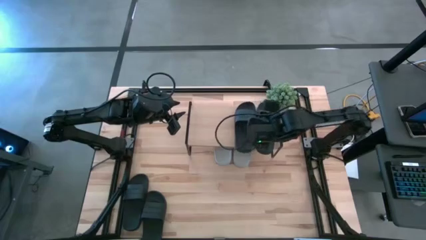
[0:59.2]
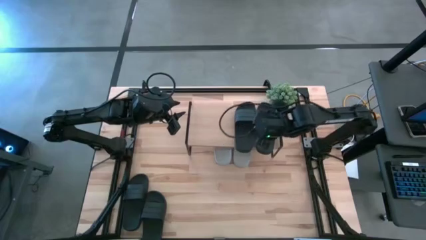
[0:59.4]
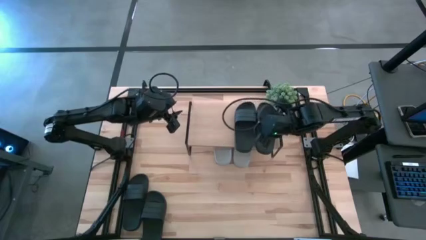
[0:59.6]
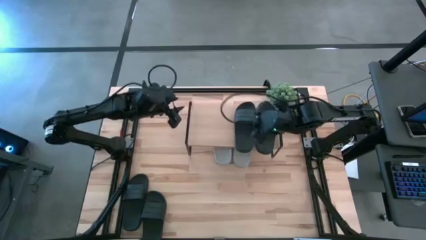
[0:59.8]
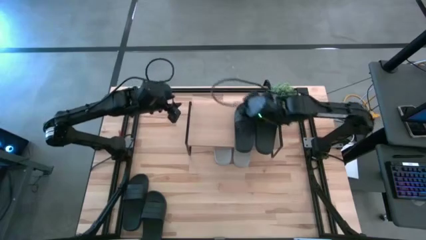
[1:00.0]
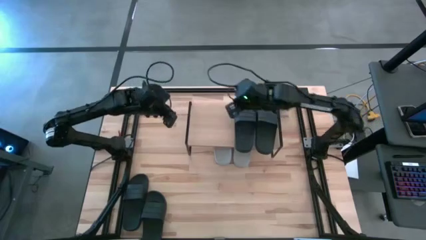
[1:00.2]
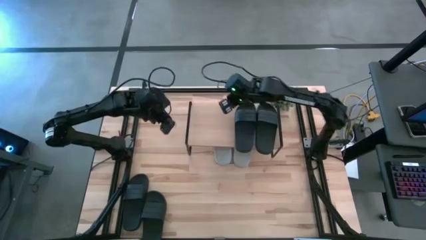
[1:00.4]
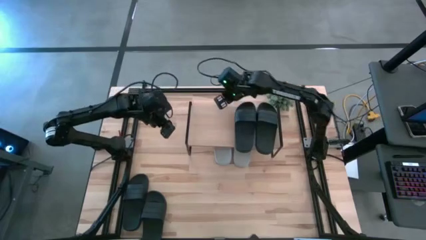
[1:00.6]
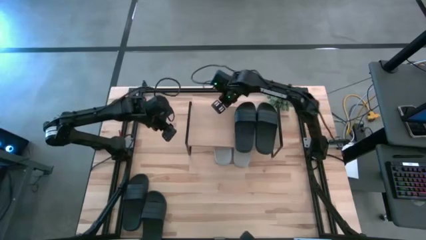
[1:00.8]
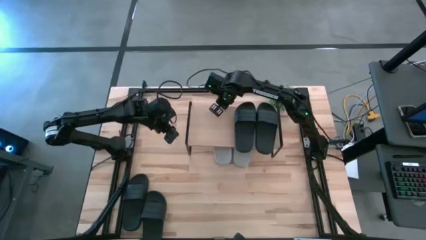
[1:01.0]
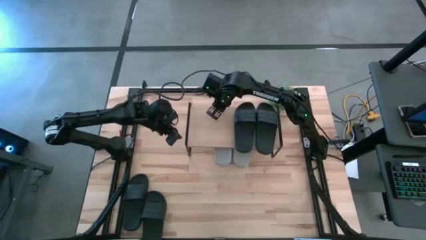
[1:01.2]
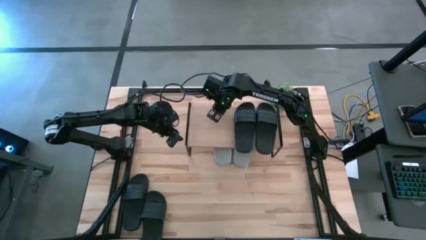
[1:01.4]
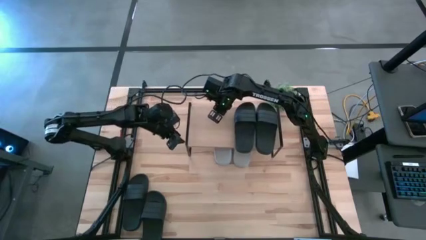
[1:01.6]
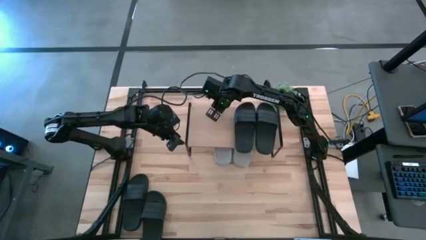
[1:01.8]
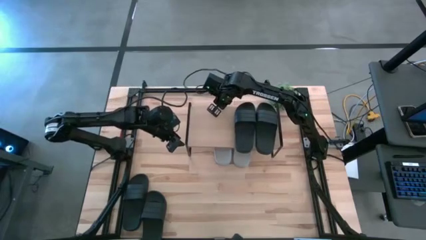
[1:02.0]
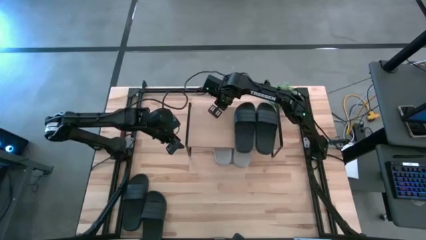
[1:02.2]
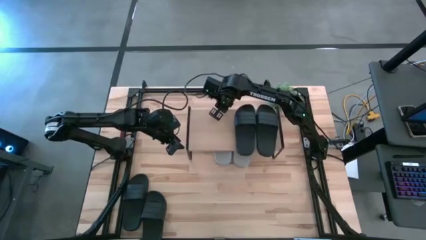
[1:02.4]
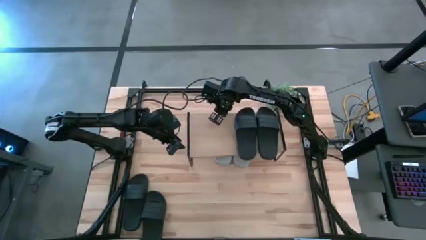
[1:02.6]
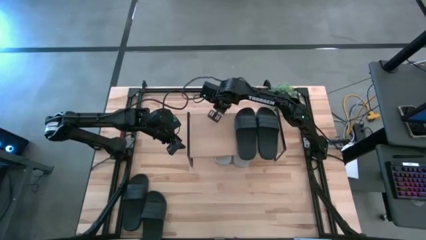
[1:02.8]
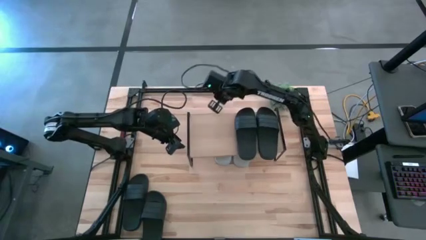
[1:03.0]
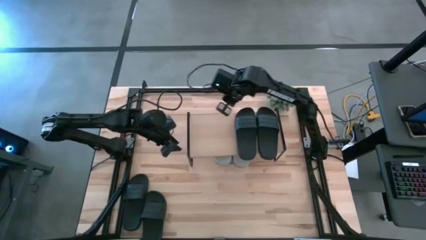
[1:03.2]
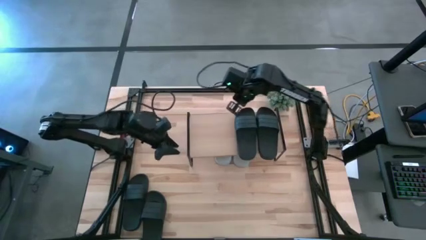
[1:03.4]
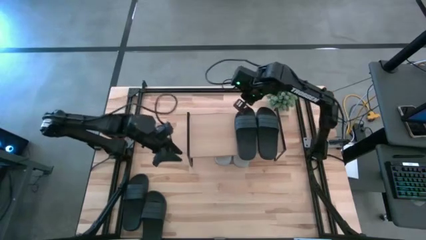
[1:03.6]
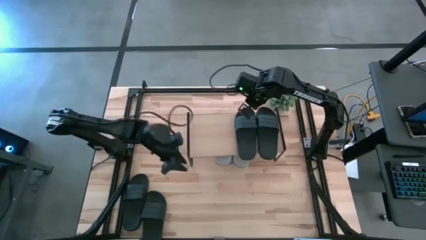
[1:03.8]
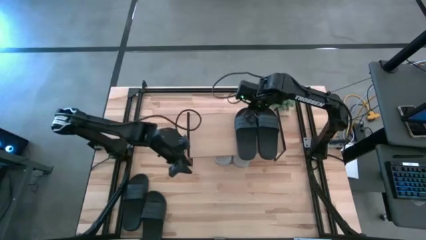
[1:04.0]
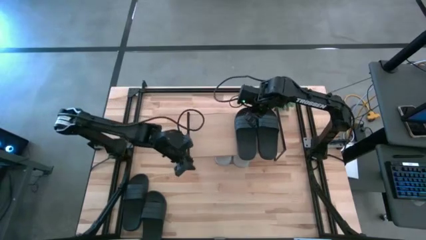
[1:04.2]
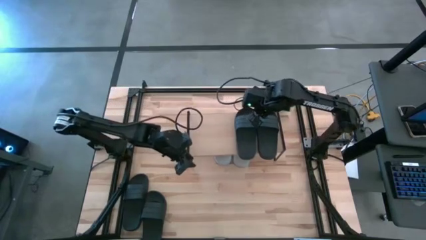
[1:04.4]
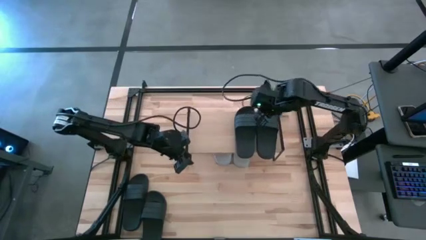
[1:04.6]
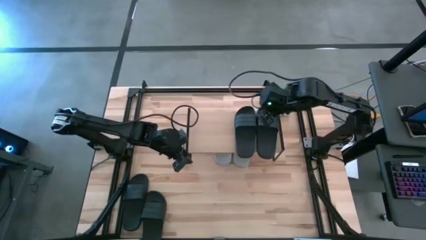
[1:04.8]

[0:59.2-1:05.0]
Task: Pick and place slides into the shelf
Adjust the shelf

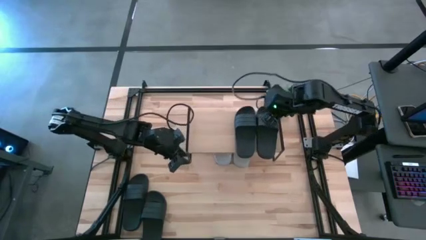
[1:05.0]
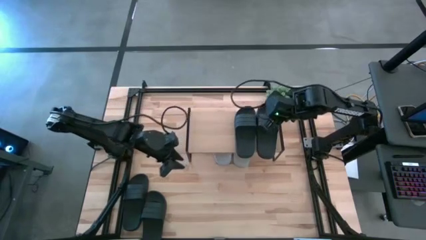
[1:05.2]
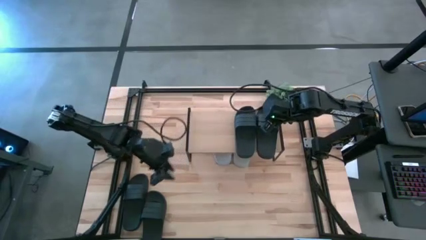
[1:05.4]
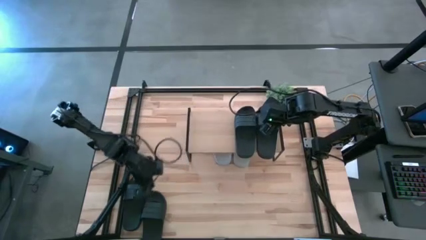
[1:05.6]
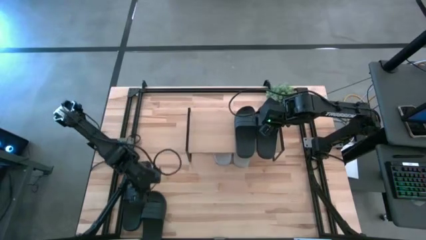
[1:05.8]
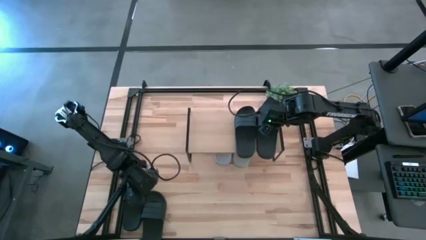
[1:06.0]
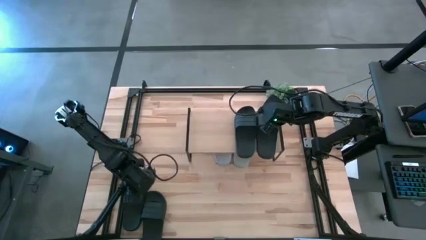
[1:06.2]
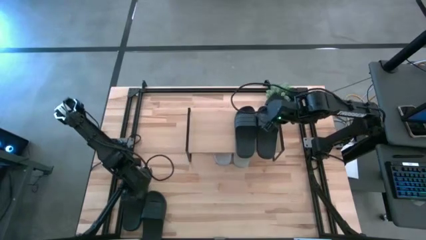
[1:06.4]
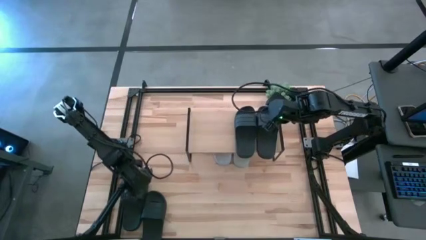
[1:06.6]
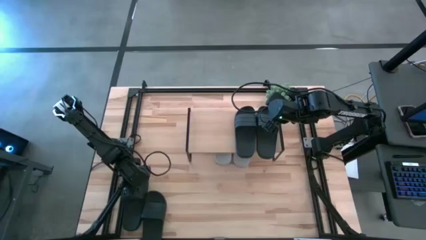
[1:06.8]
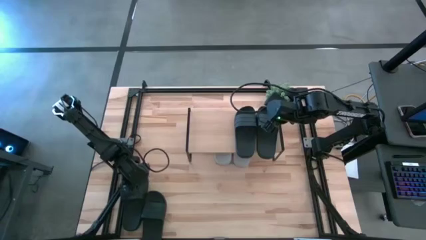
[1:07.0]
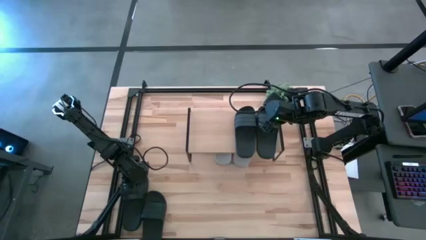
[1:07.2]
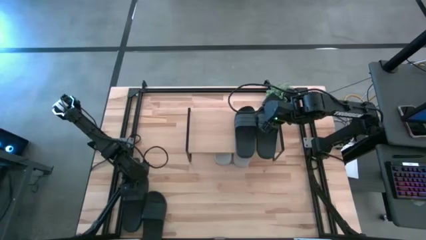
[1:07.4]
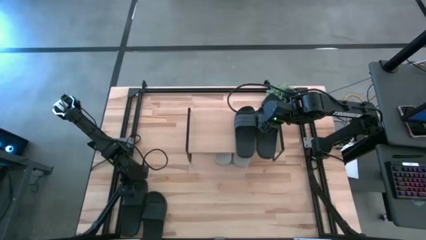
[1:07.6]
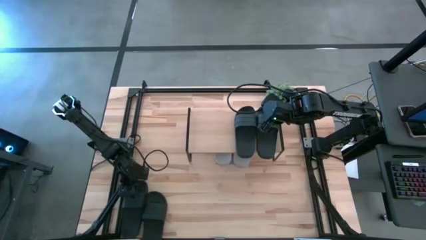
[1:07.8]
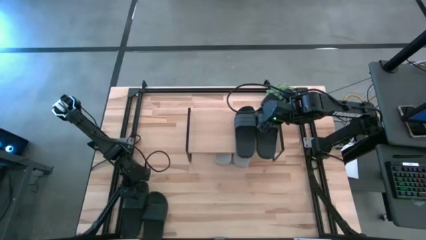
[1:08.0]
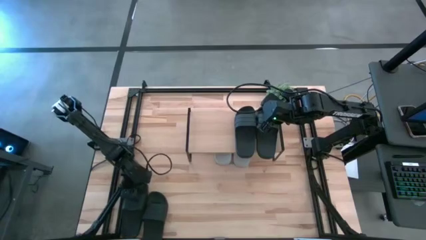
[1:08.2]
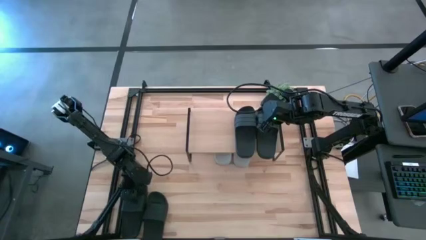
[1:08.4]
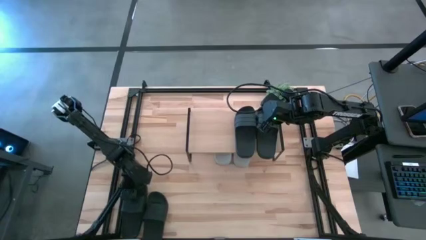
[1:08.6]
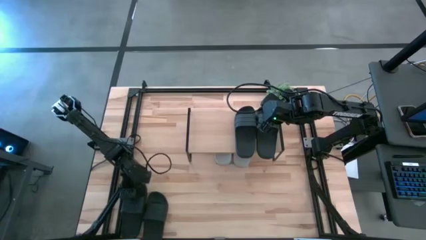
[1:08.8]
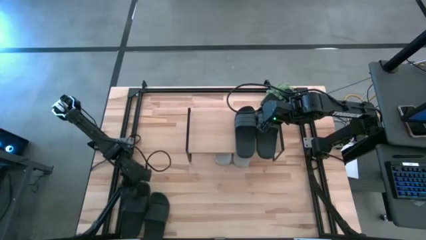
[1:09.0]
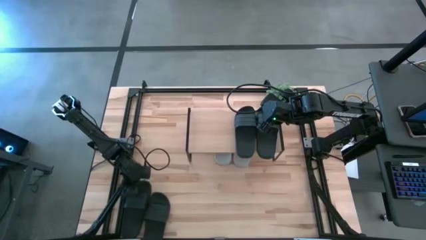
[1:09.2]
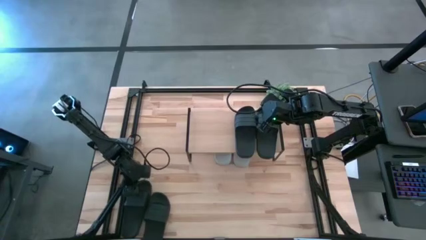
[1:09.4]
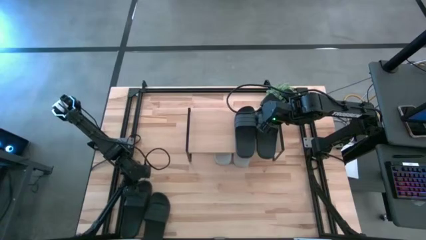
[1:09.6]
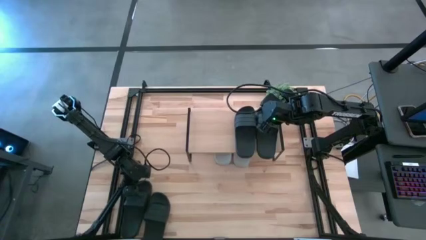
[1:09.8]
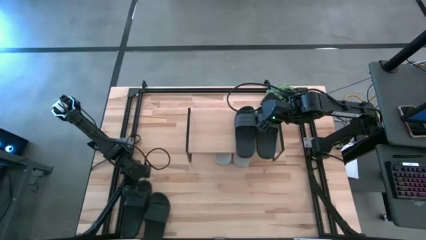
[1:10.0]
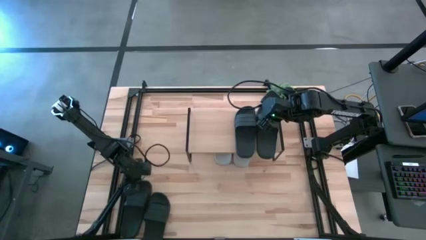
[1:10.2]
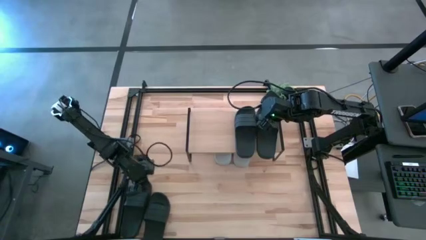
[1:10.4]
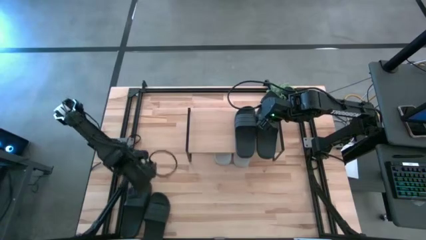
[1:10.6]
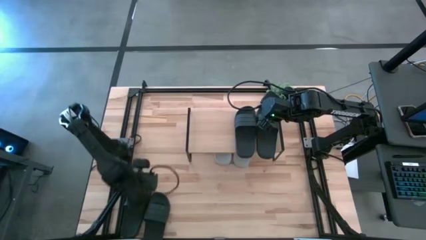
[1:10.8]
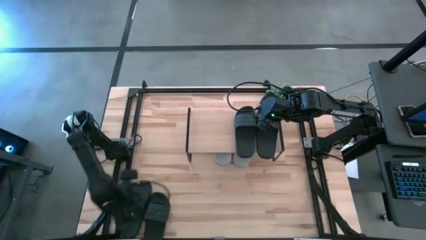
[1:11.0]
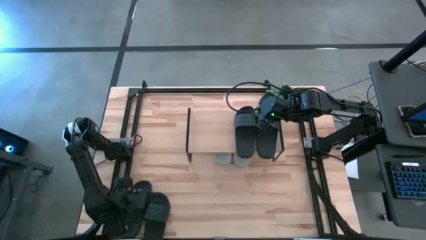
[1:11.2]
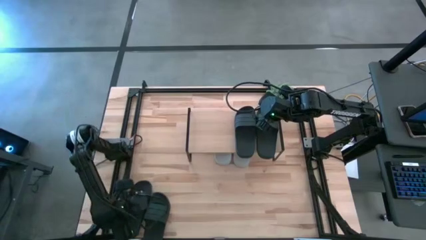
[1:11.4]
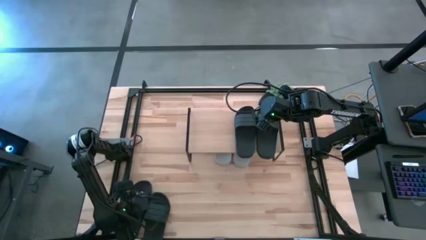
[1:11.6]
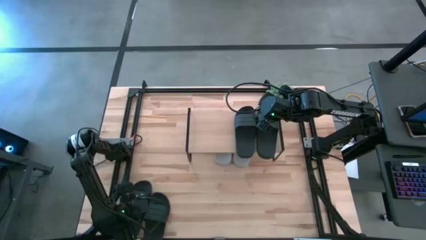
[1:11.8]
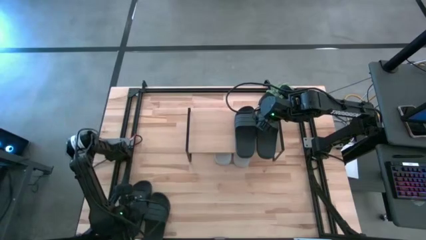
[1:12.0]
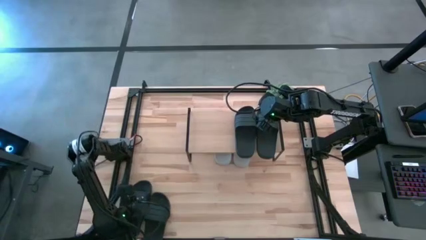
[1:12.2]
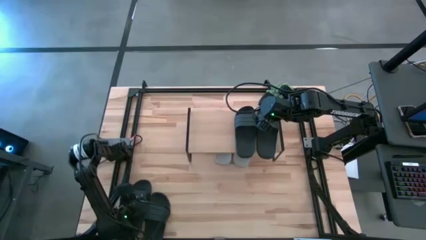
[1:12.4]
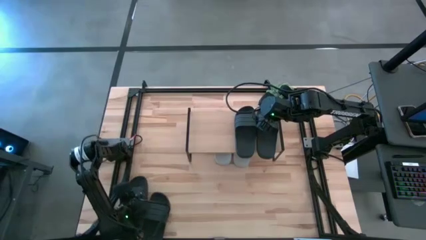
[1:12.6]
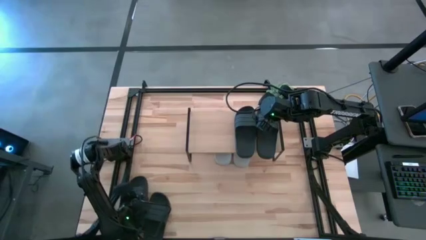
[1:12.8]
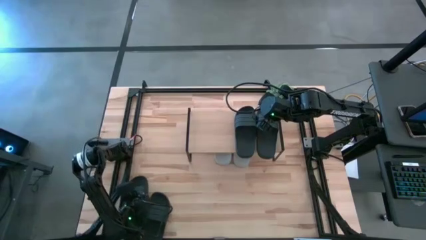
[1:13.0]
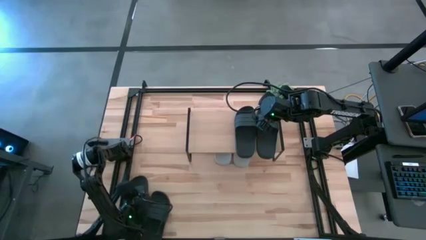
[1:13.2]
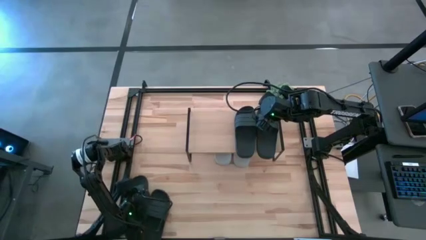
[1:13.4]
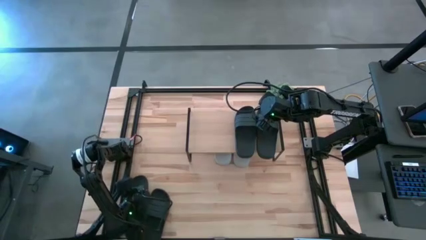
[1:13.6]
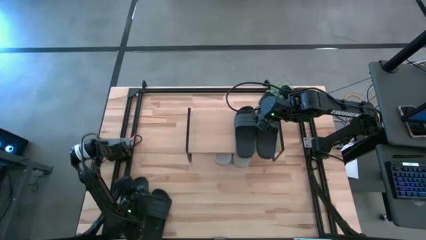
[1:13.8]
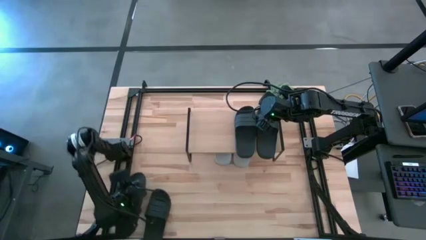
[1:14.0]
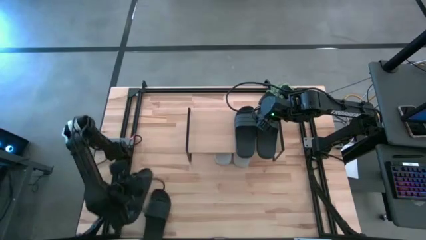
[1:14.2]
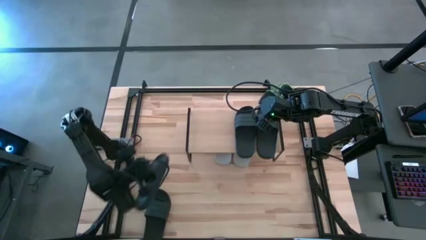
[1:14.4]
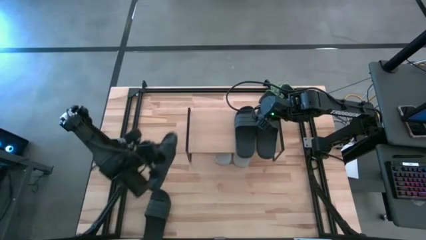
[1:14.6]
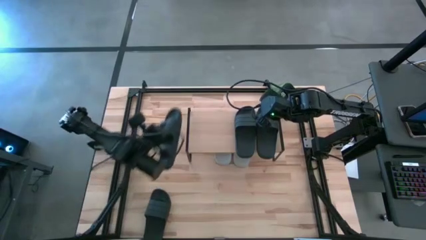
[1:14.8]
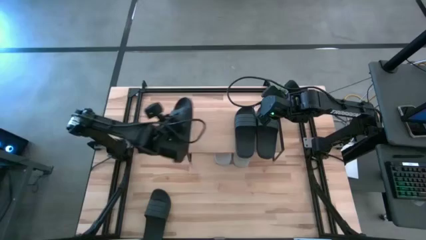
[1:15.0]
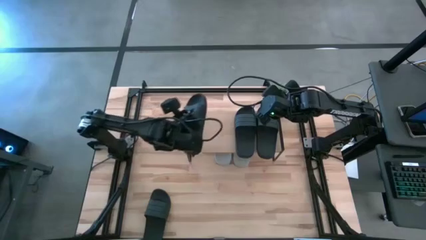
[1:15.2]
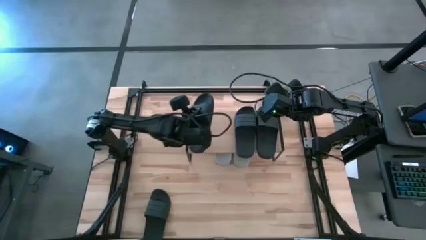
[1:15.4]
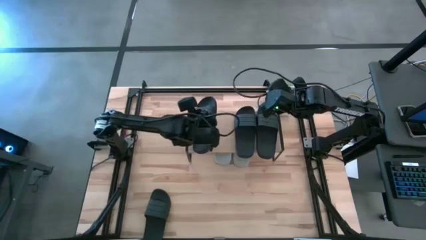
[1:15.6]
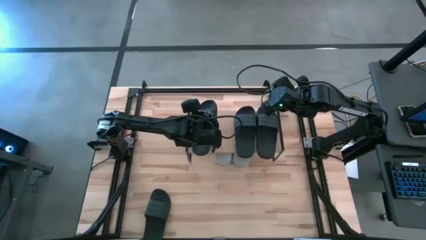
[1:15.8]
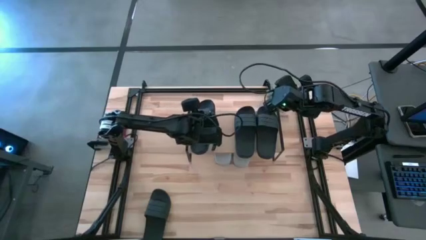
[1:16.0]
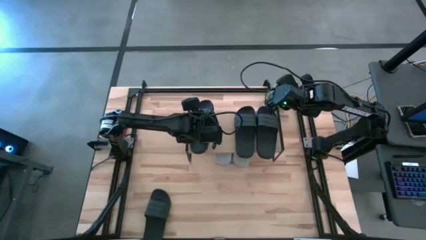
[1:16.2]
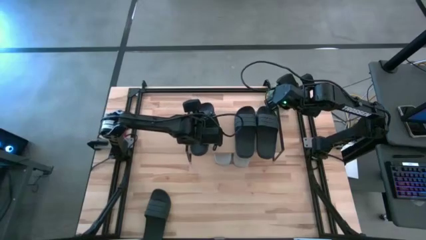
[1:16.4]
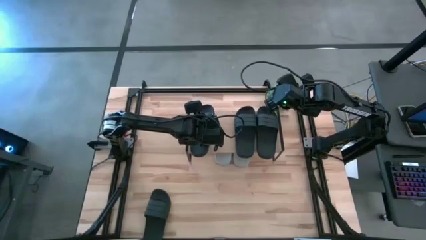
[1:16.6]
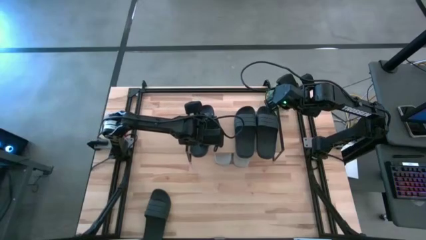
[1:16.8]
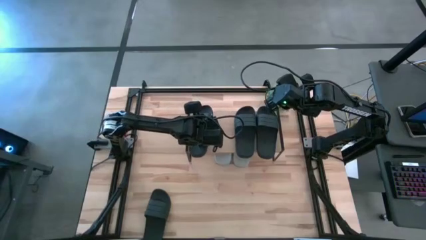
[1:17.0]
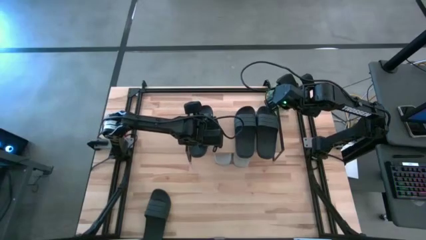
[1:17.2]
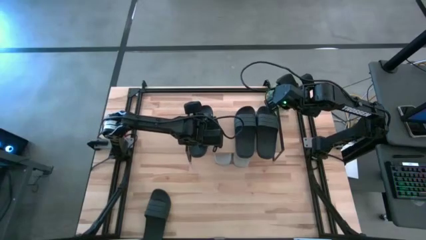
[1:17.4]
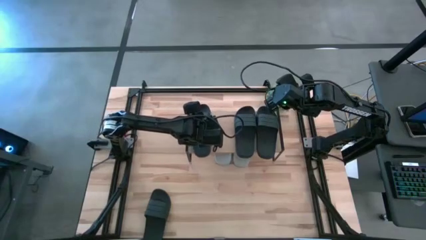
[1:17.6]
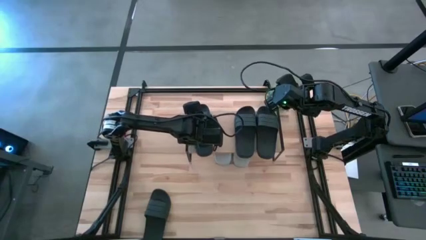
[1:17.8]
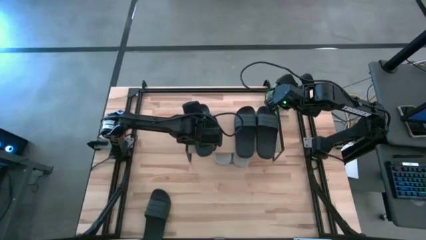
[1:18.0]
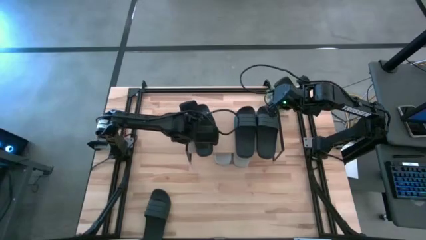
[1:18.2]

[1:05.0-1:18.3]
Put the black slipper on the shelf
